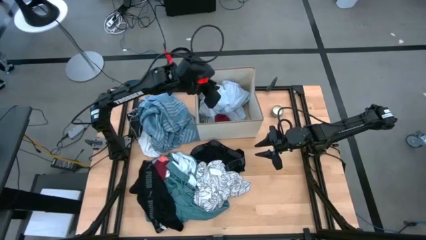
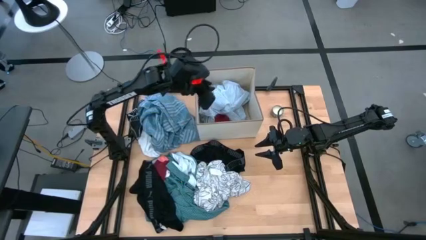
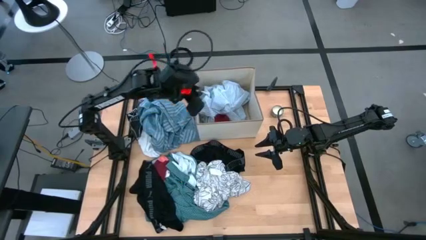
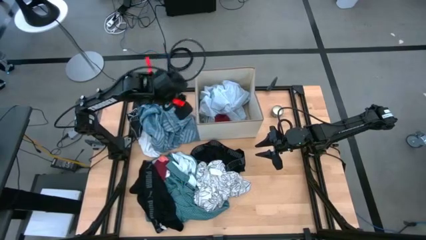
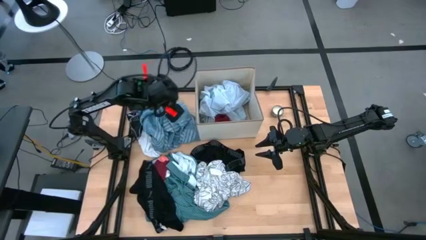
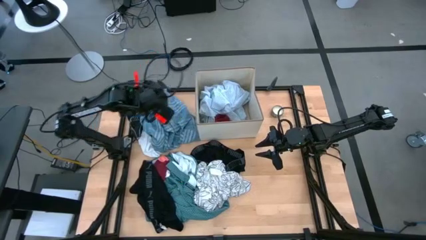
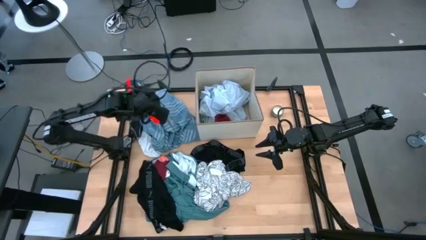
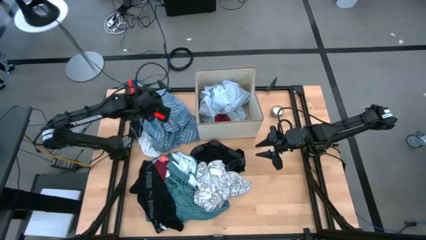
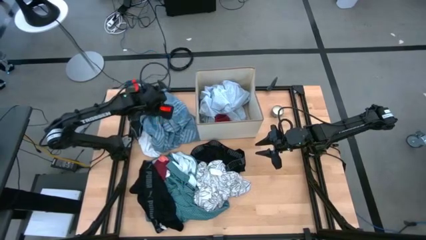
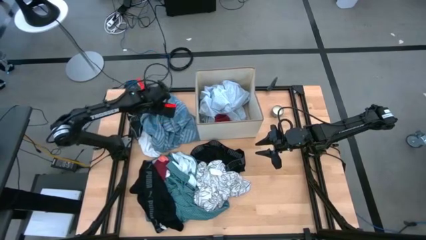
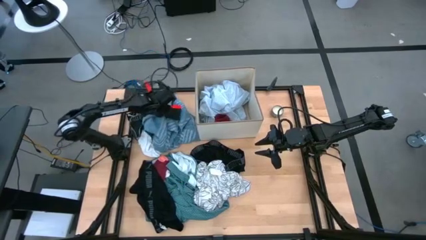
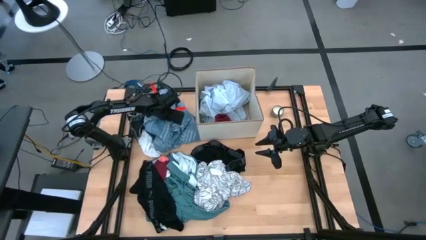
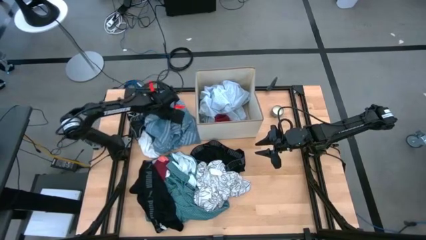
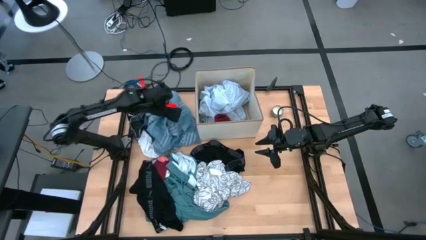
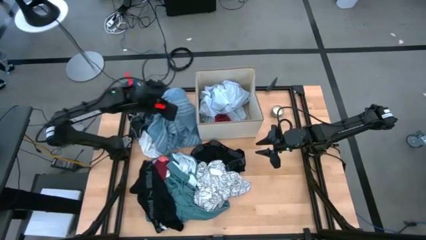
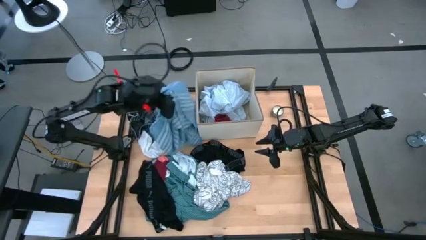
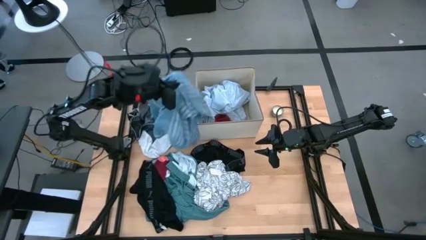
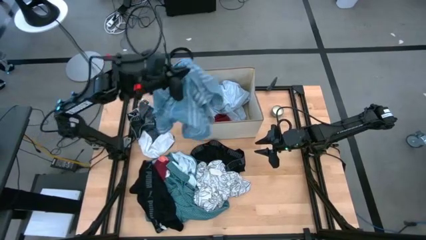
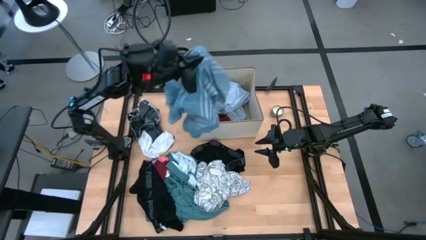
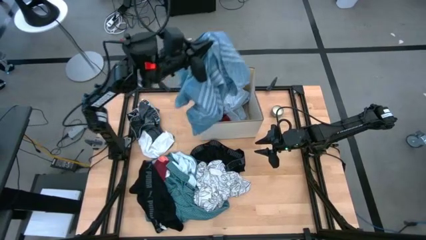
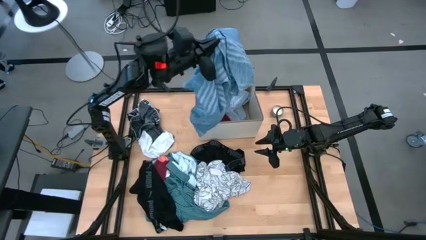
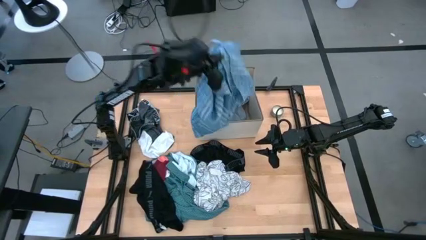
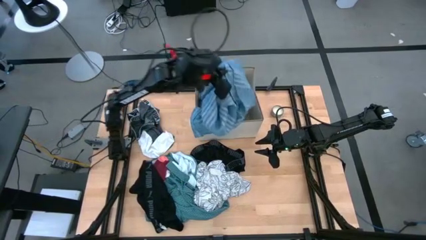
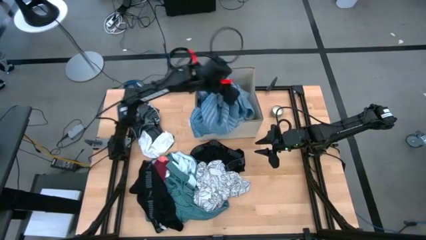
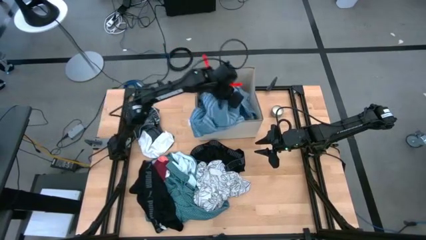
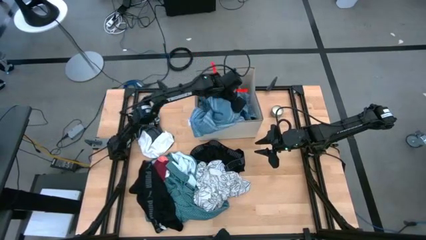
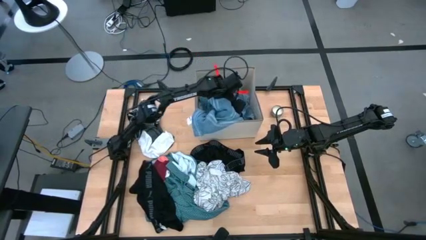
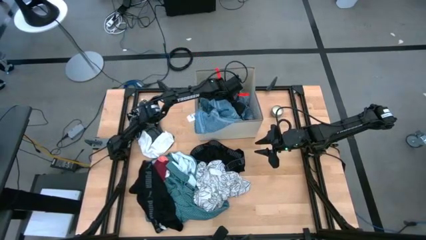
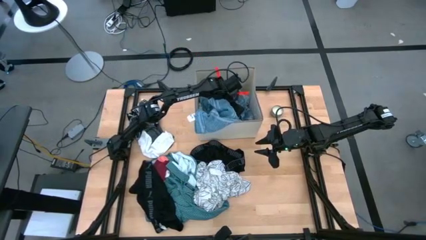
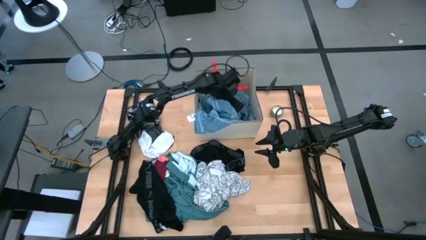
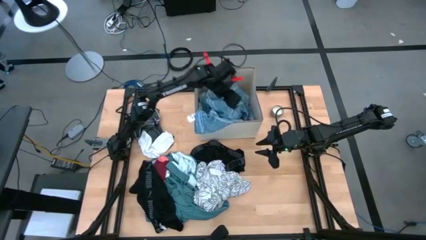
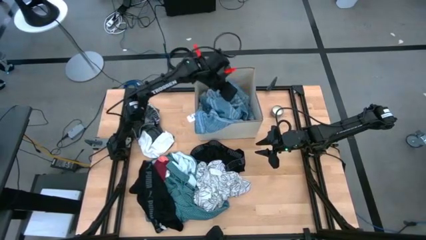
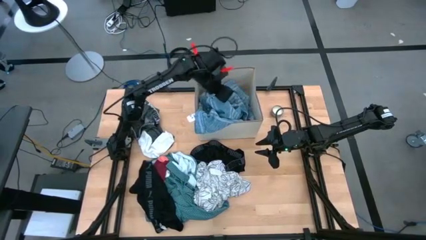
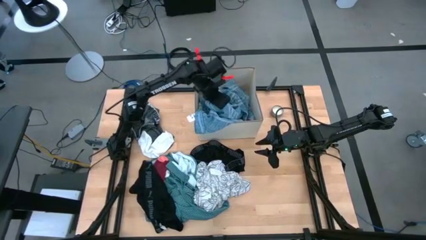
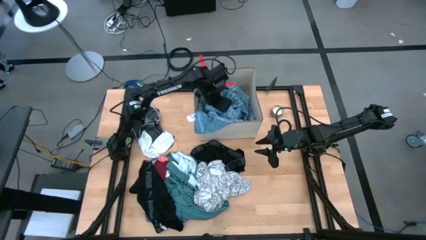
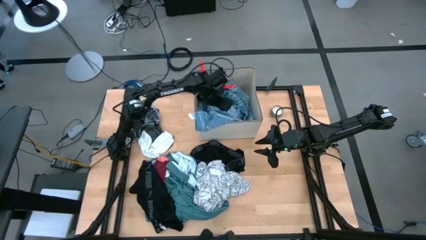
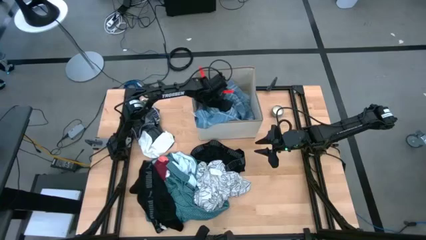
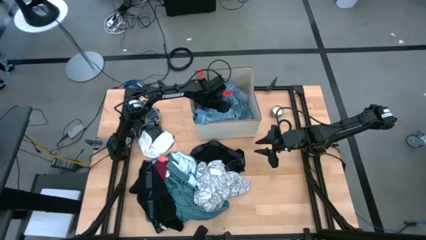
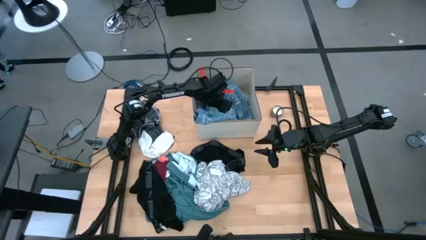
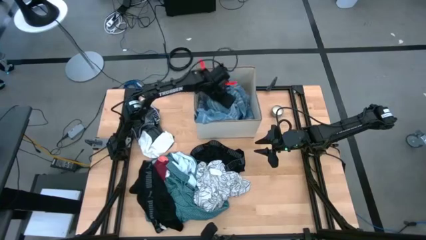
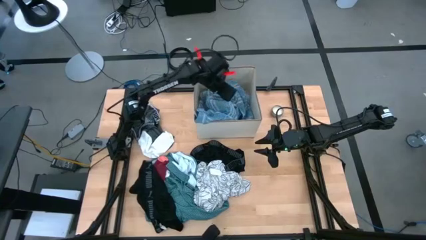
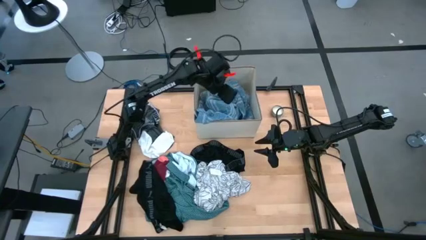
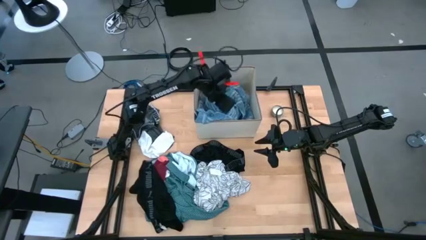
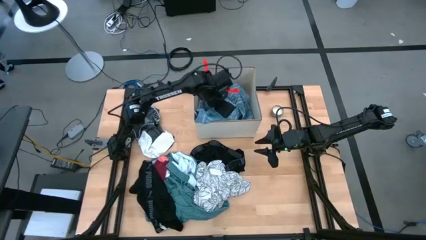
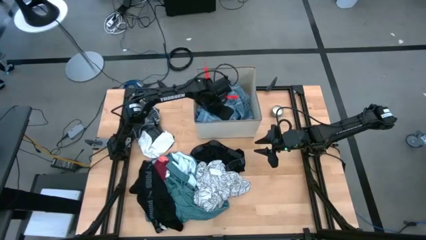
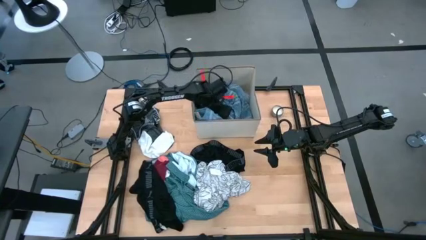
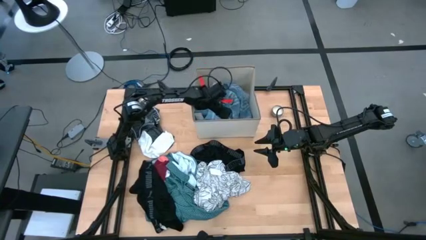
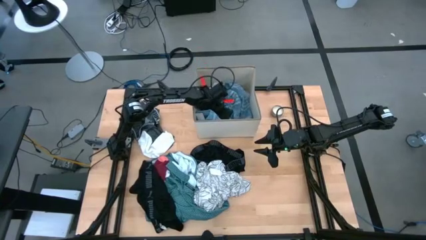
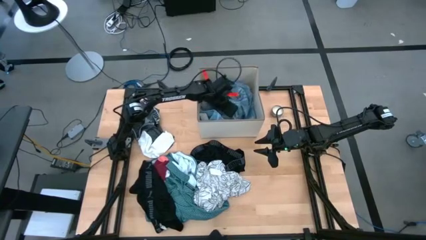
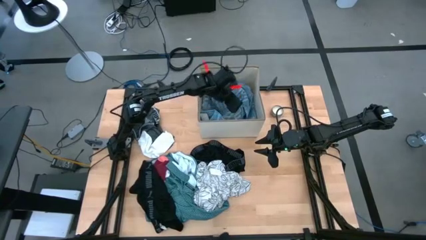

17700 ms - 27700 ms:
Task: Sort clothes
Put the blue shirt into the bin

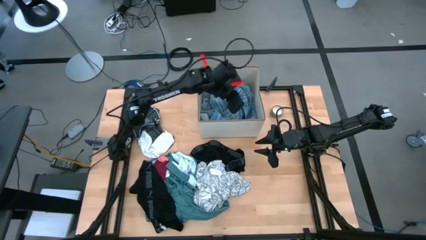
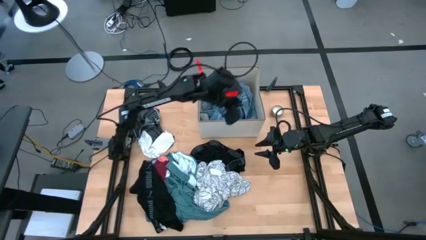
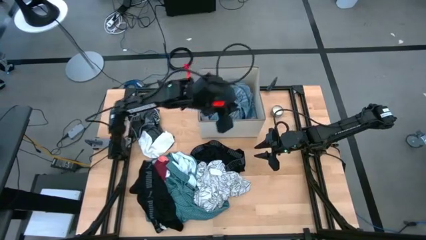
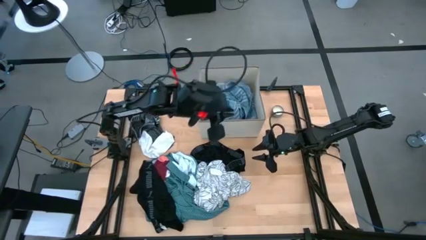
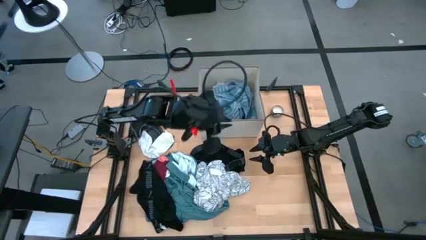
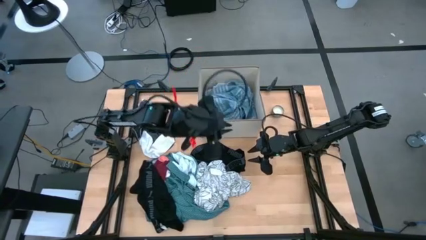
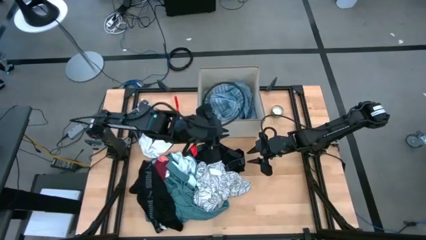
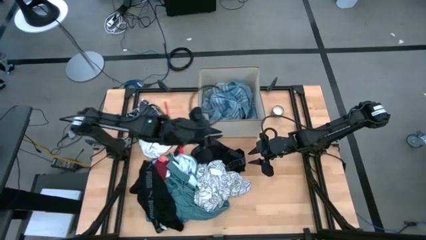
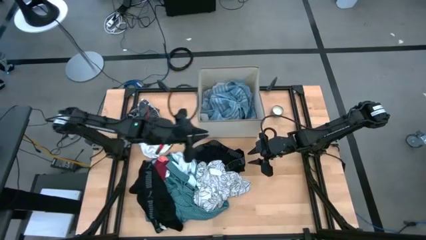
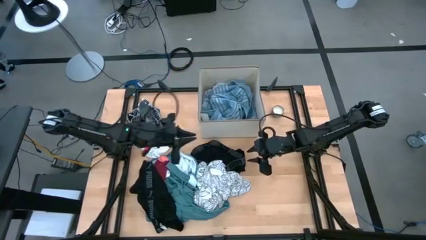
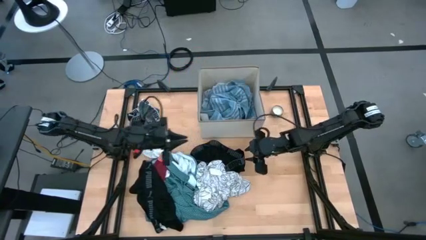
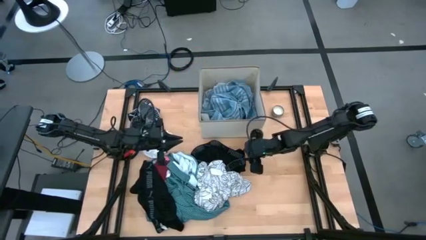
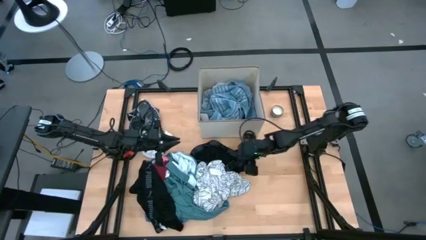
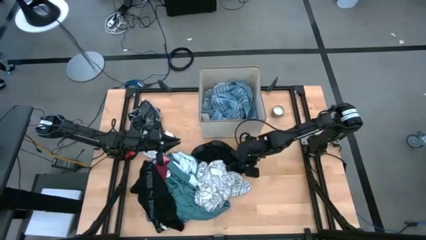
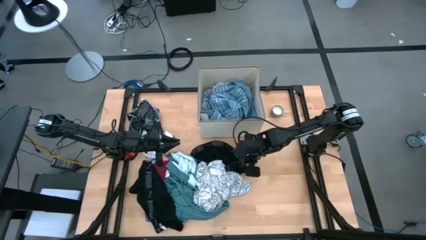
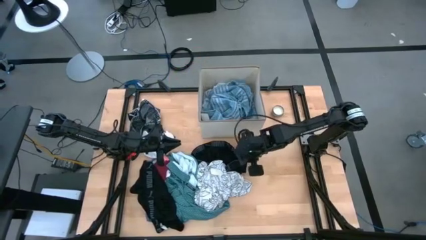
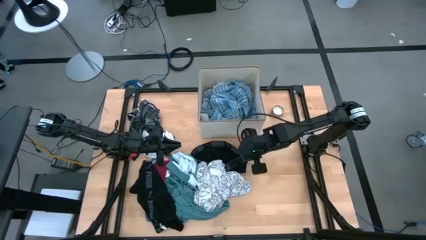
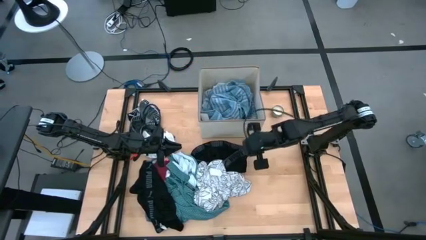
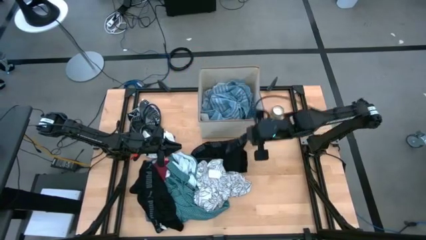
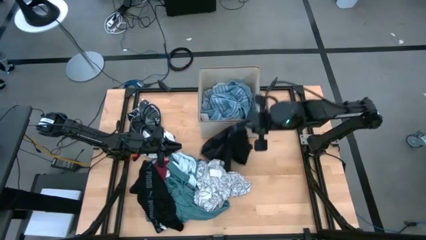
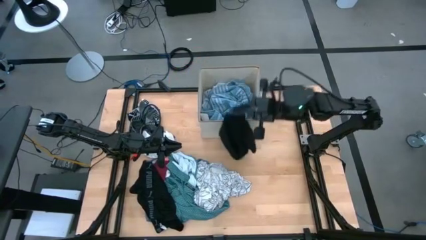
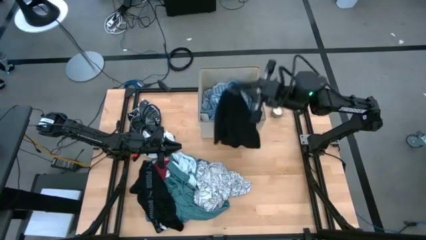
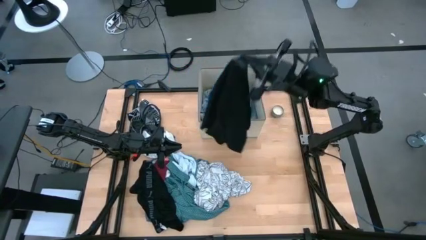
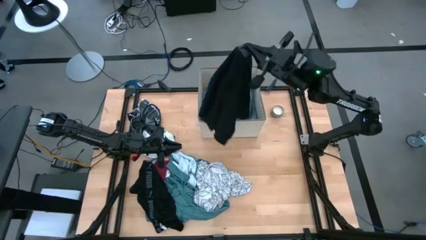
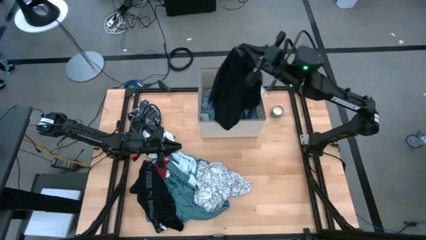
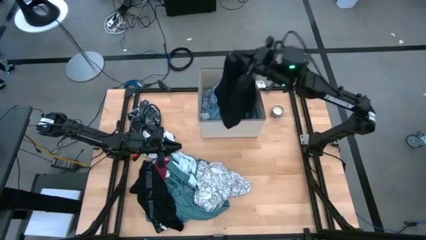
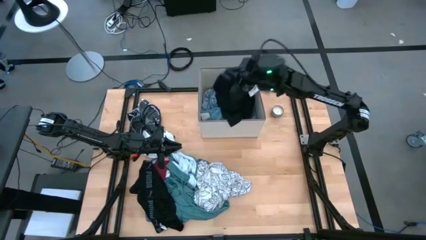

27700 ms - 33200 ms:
Put the right black boxer into the bin

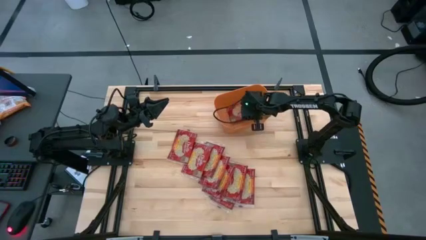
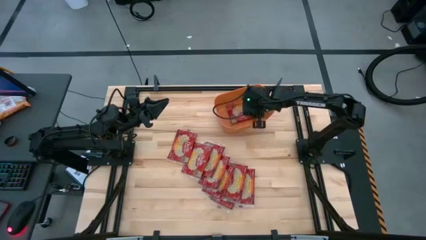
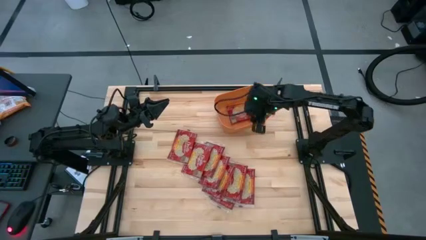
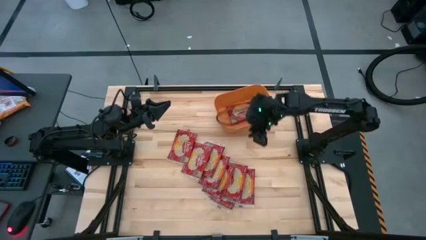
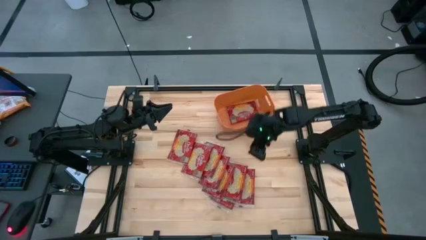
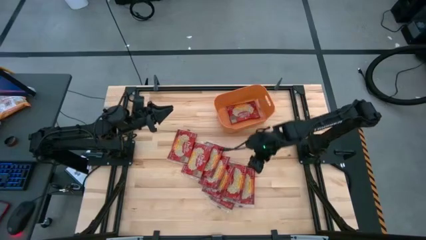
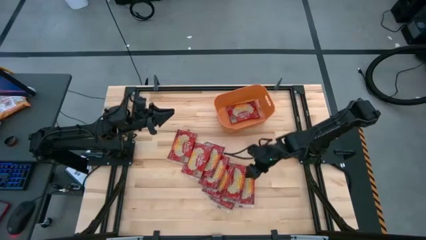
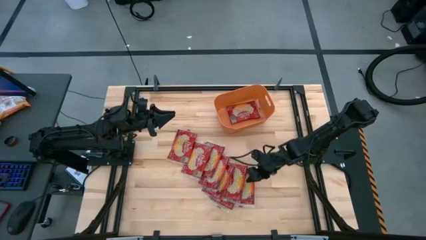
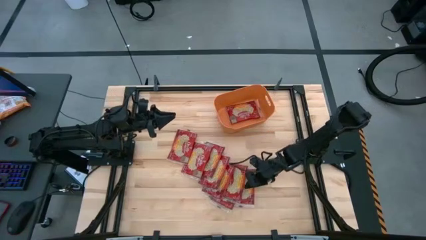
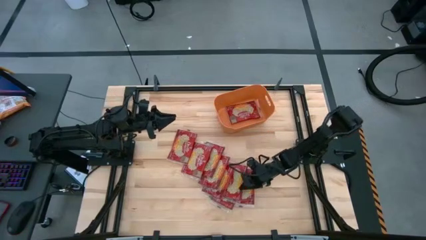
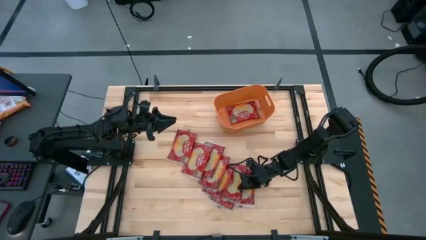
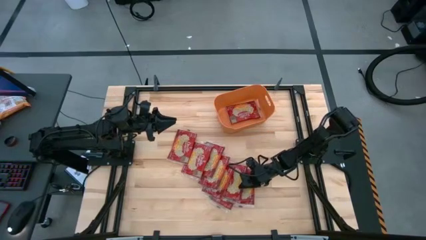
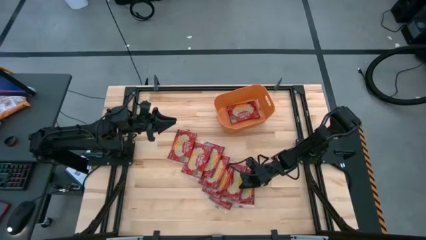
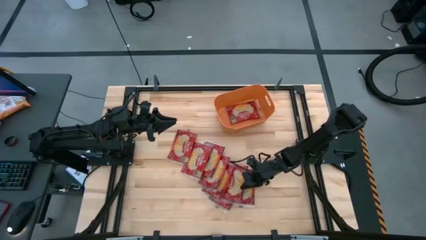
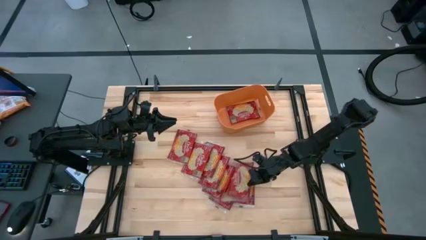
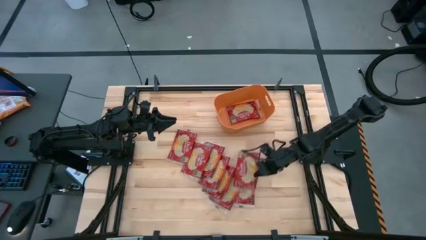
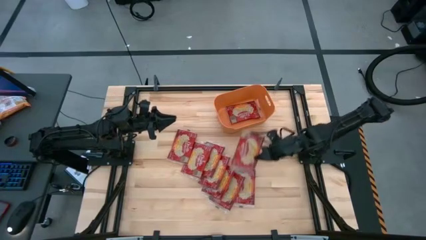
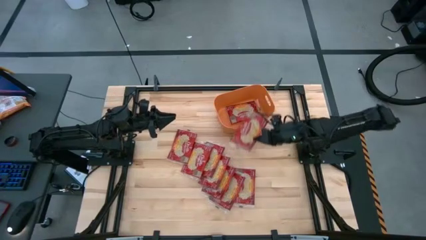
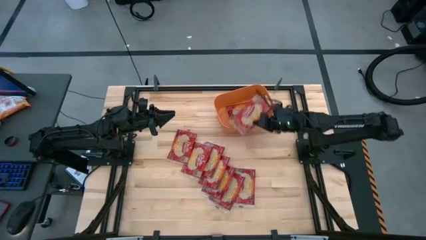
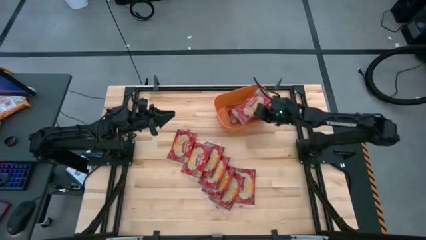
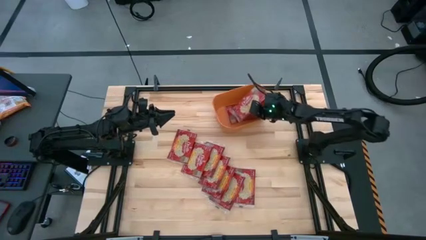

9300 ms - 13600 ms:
Task: Sort popcorn bags into baskets
Put the red popcorn bag into the orange bin
